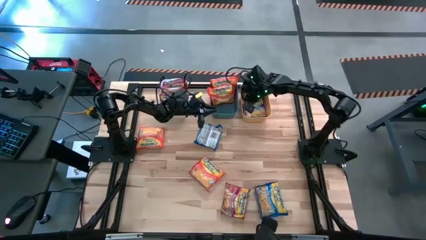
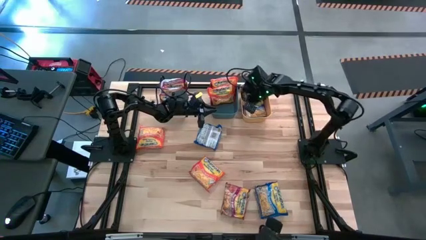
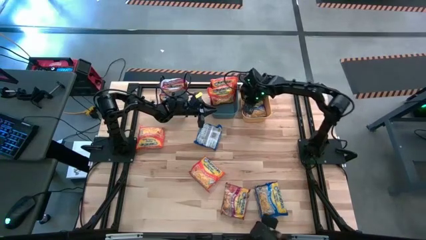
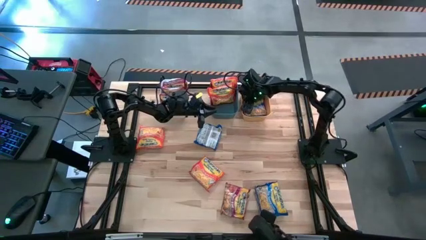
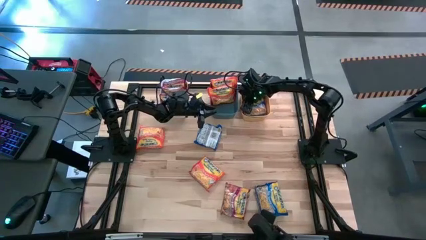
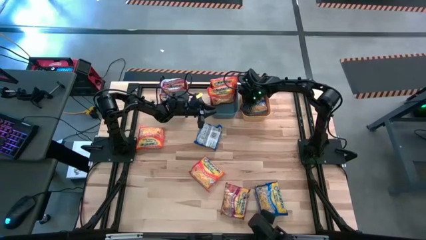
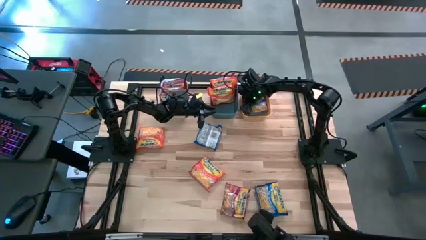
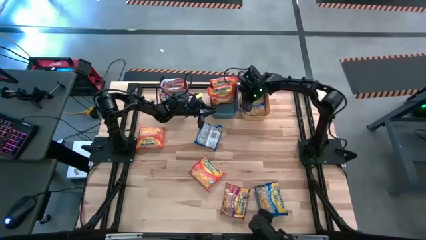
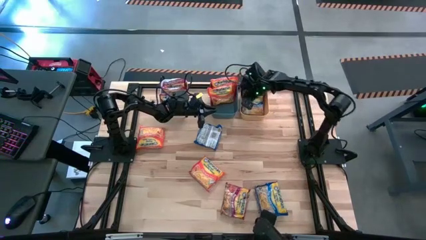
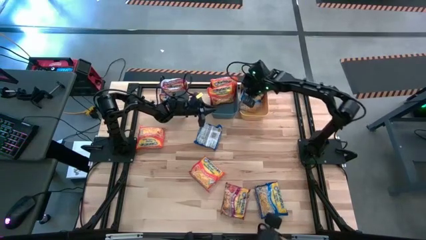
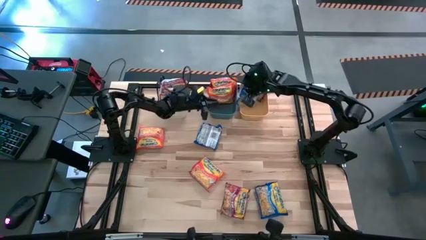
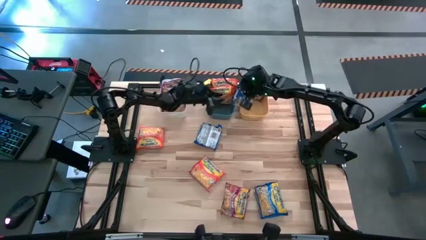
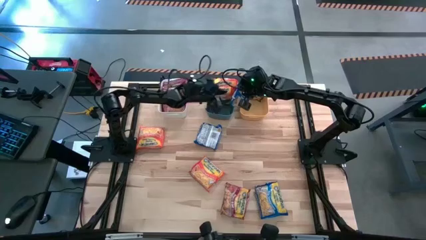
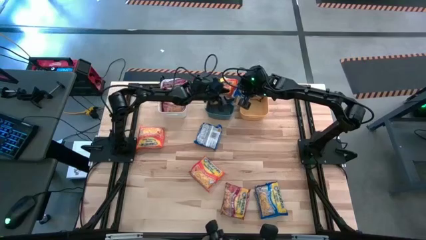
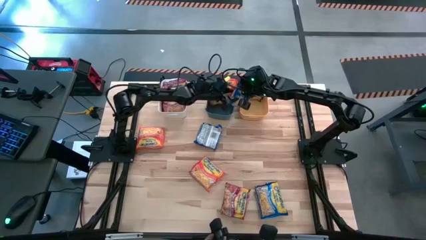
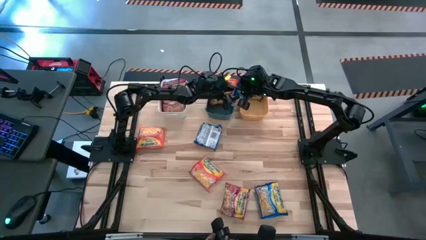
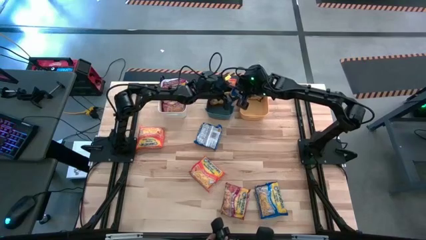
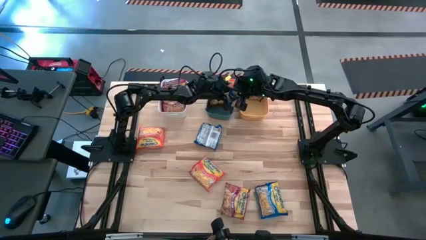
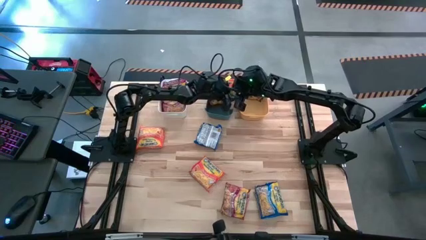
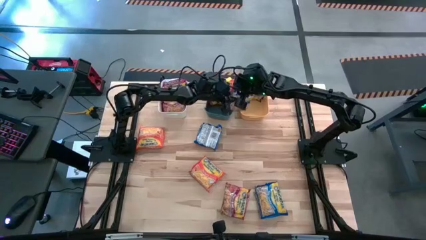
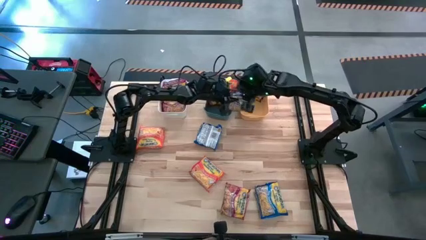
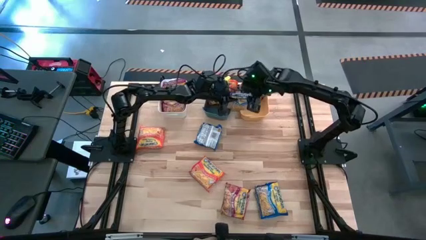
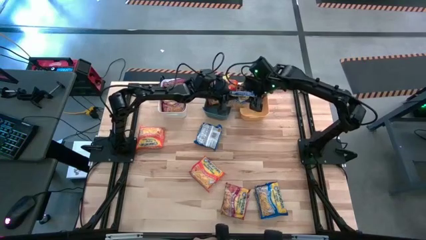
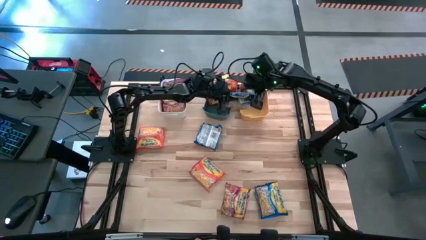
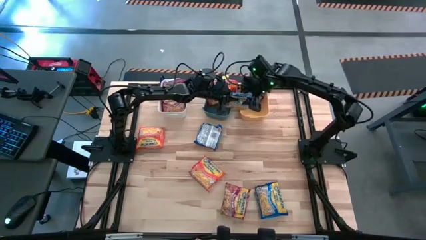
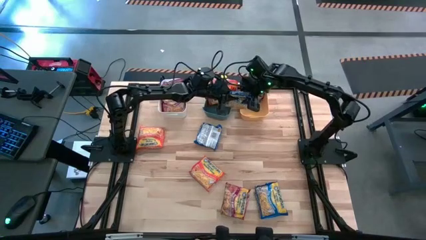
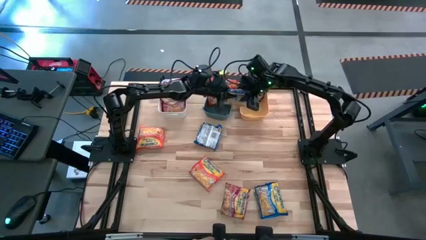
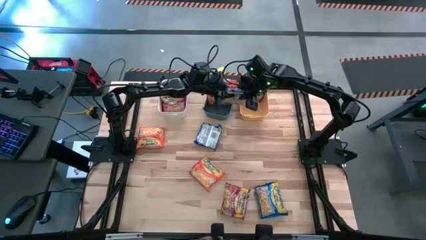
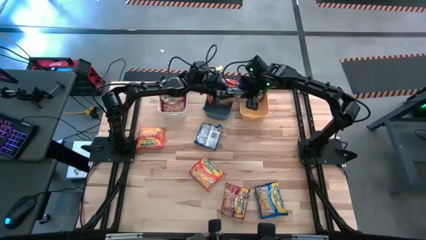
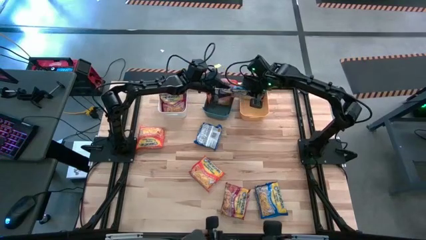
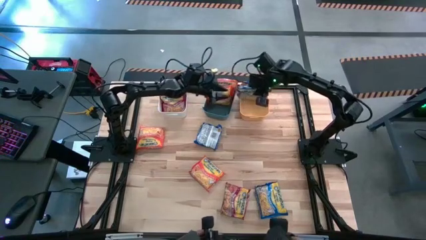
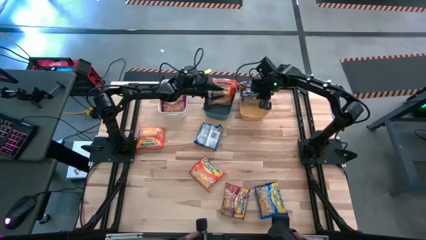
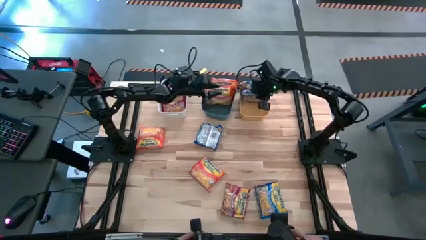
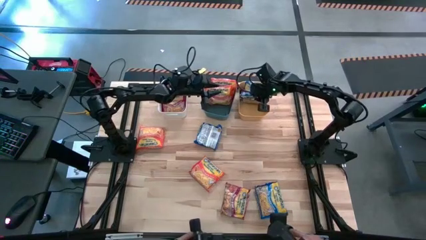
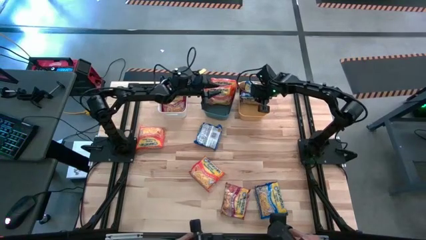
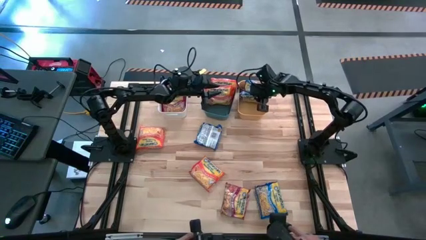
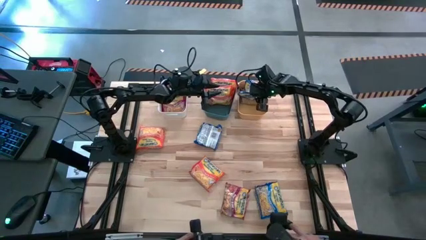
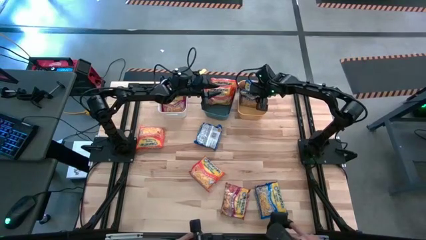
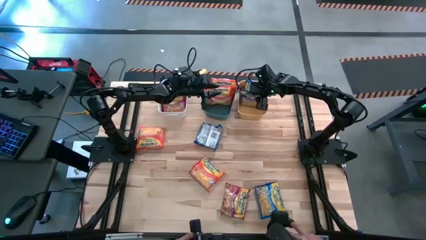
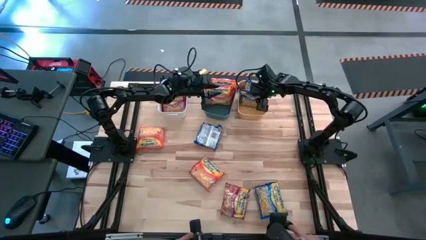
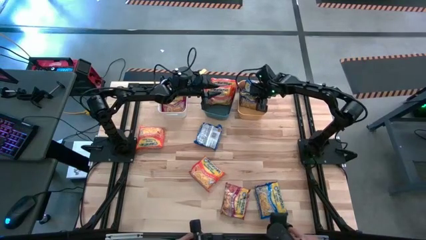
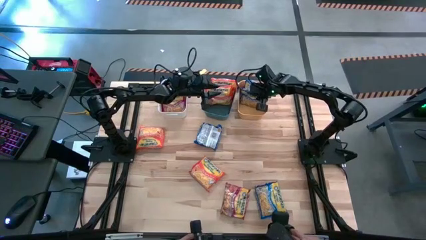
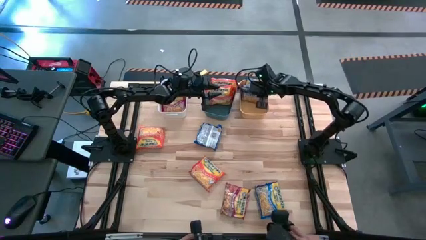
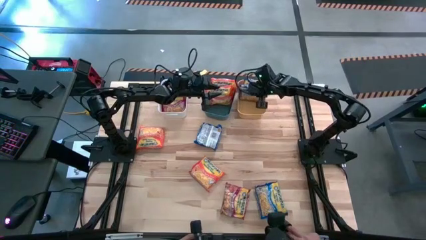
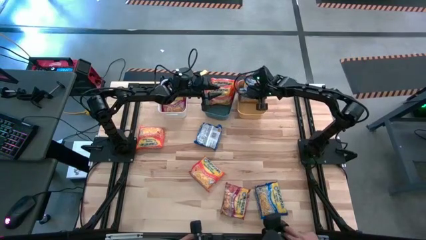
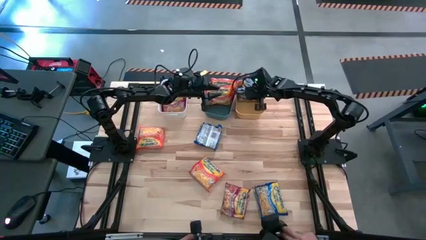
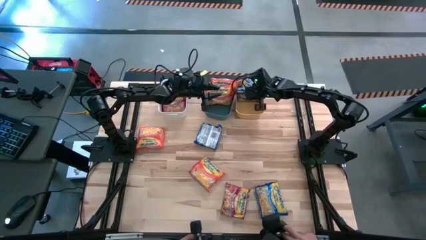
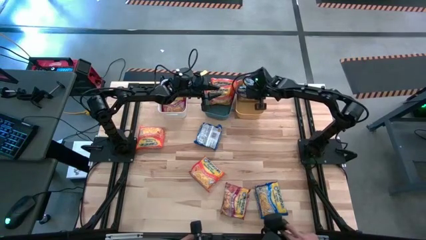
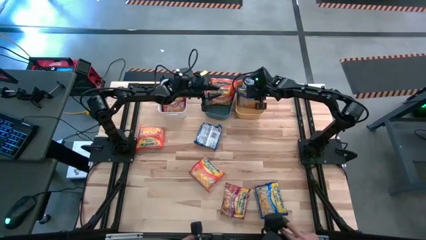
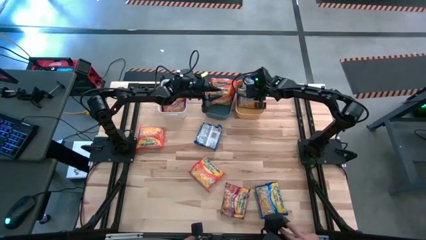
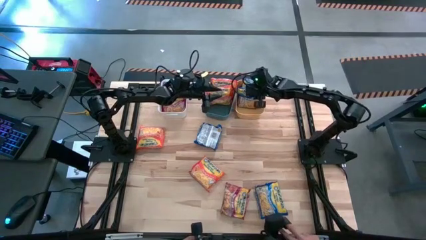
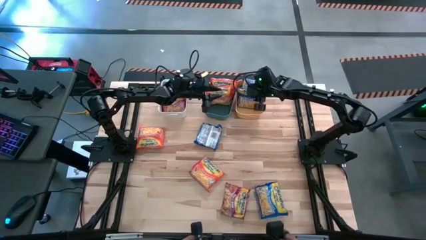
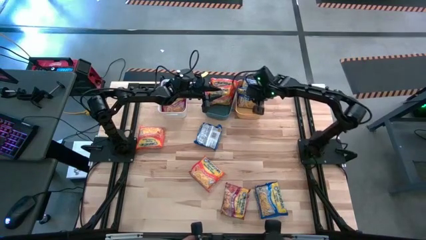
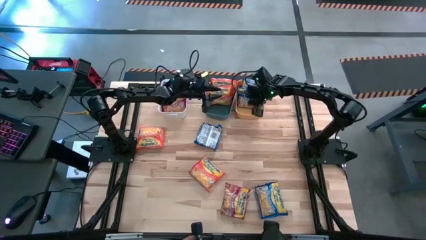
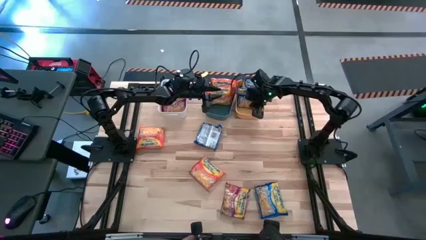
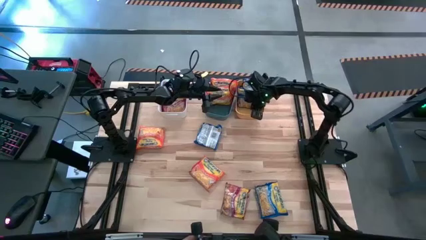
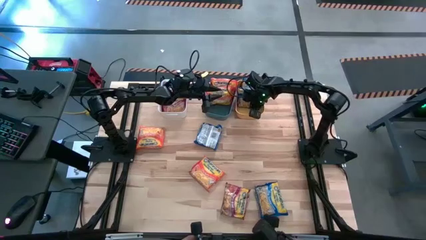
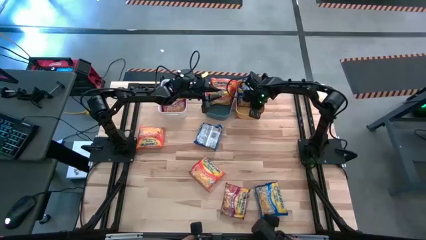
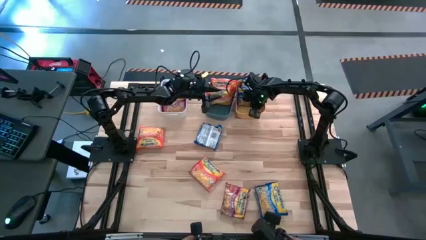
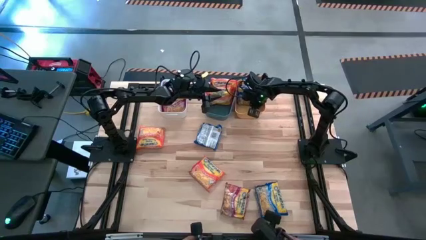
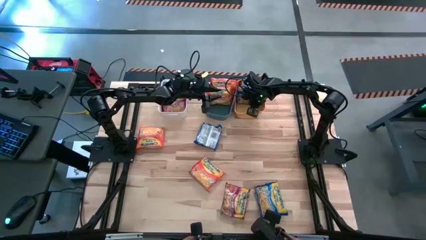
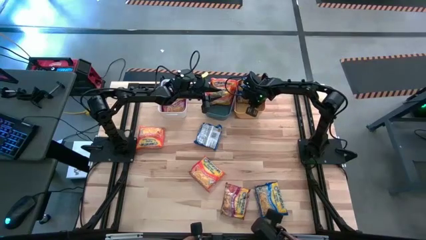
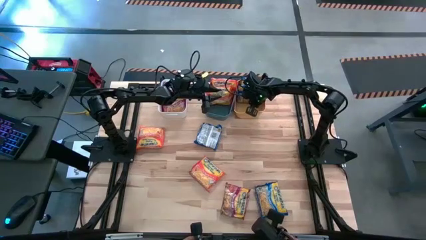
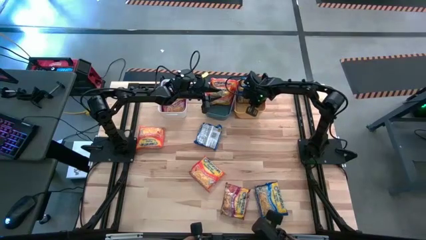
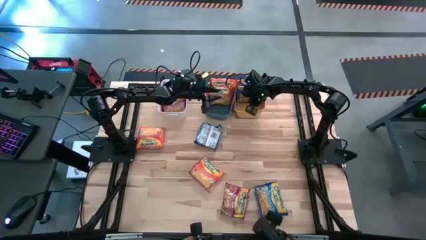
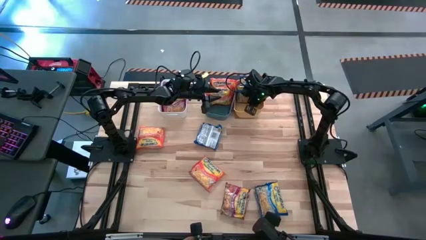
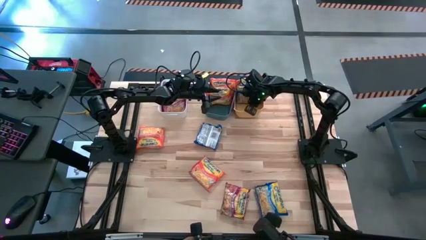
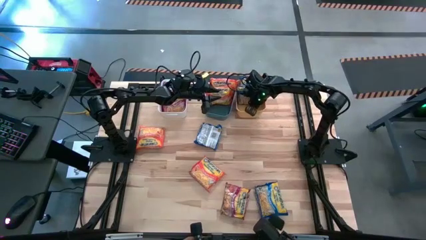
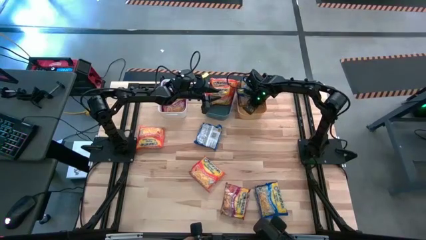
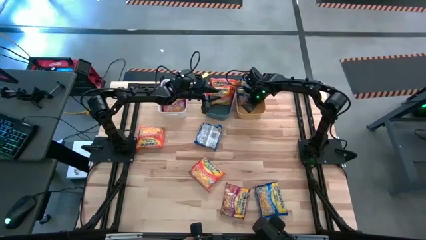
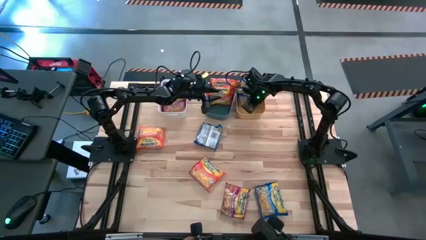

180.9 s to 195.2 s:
Task: Sort Maruchan noodles
Adjust the blue noodle pack into the yellow bin

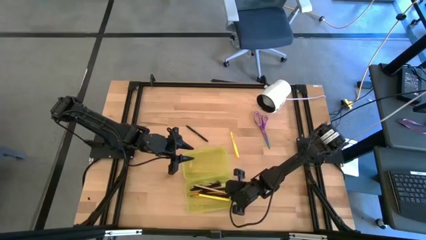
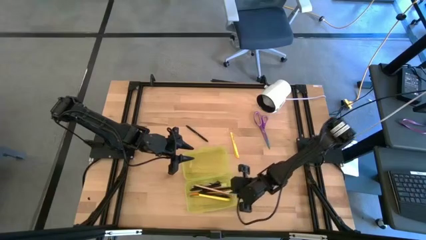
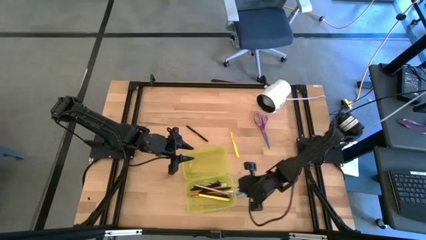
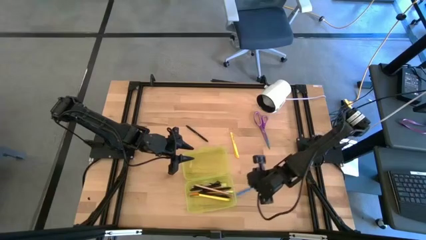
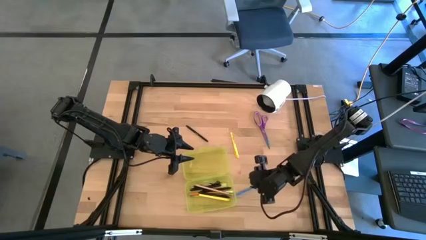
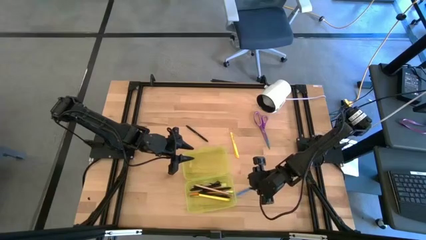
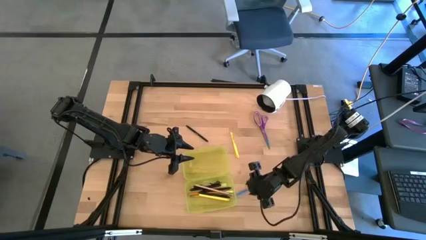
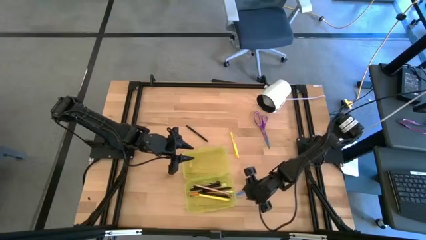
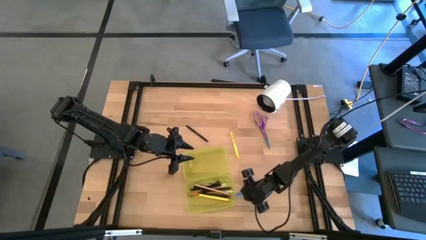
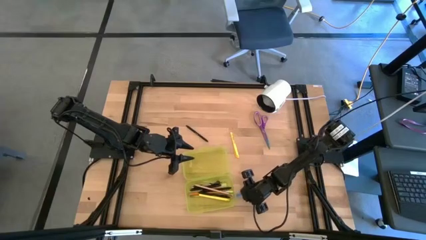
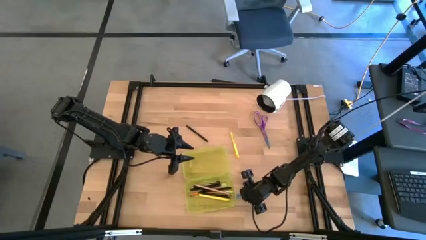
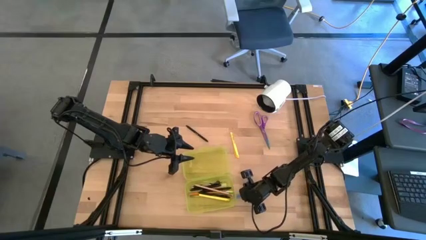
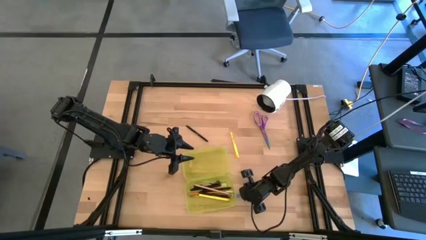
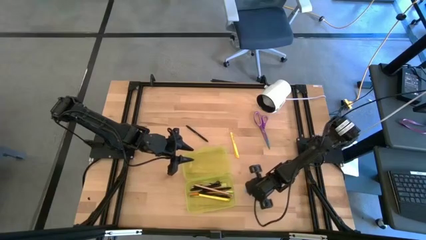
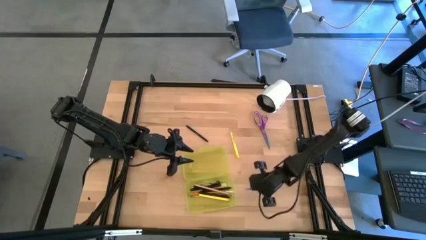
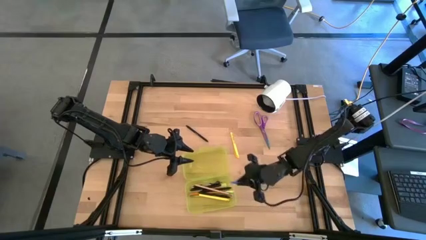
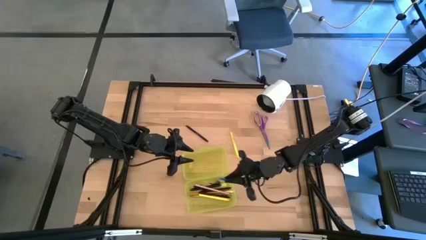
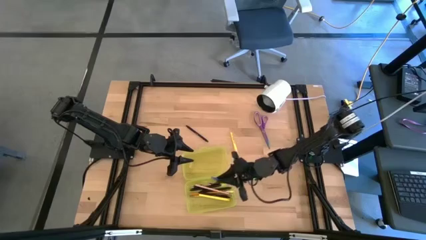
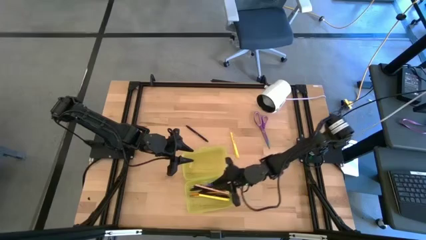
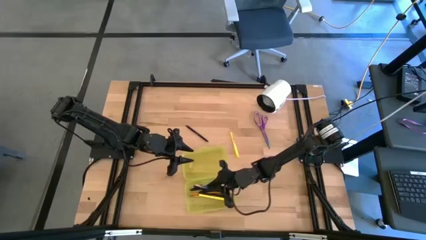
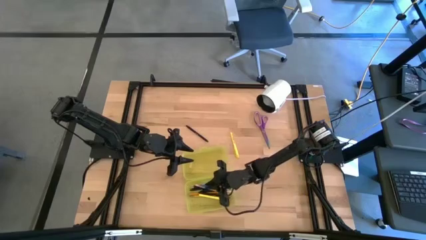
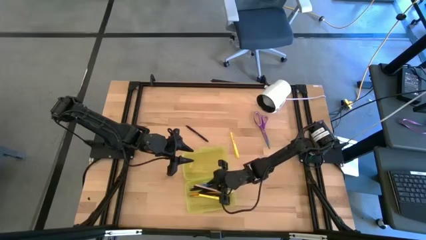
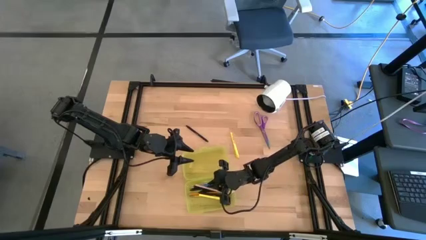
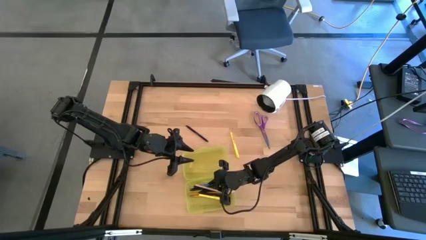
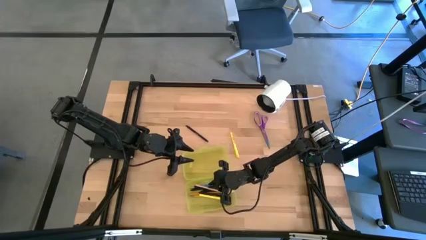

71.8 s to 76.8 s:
Task: Pick & place school supplies into a supply box
Put the blue pen into the yellow supplies box
